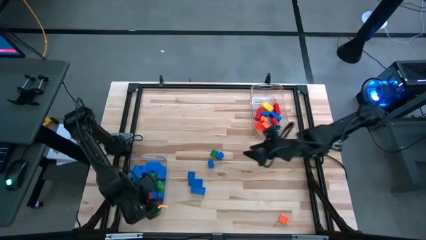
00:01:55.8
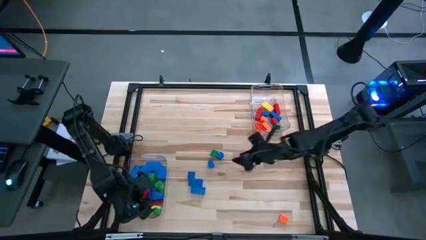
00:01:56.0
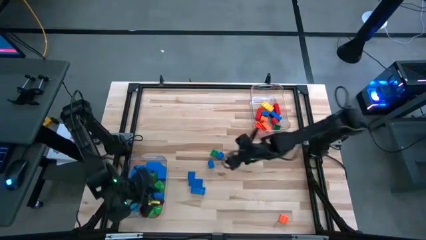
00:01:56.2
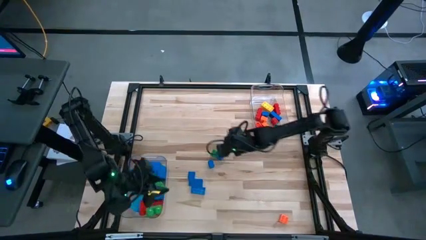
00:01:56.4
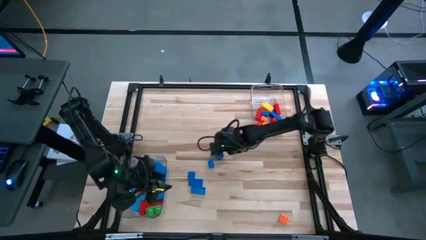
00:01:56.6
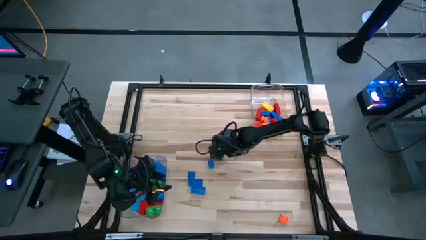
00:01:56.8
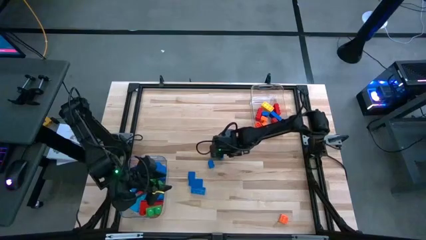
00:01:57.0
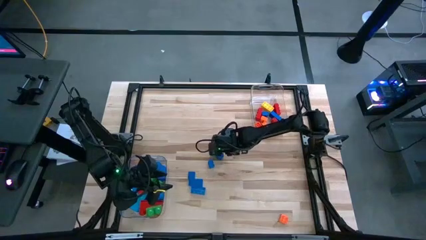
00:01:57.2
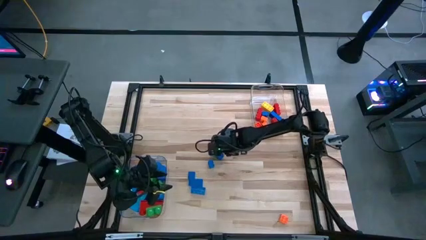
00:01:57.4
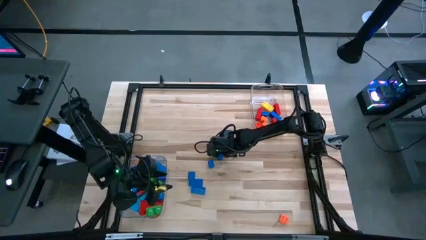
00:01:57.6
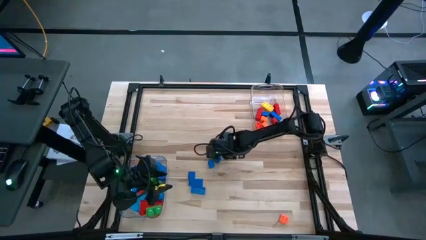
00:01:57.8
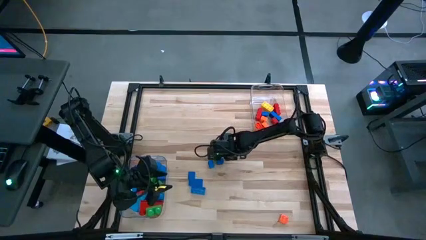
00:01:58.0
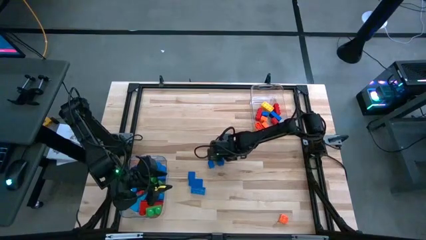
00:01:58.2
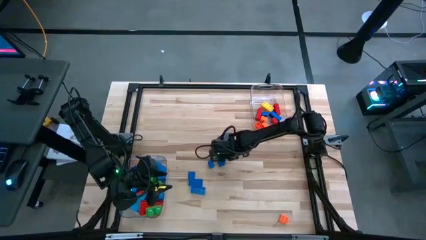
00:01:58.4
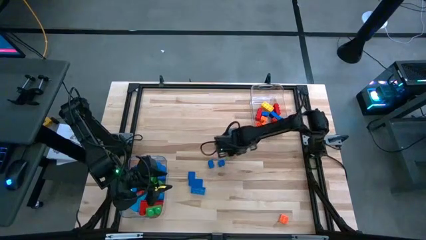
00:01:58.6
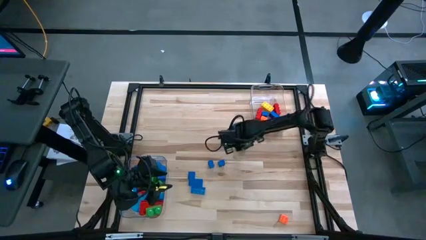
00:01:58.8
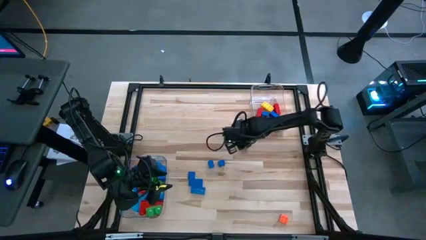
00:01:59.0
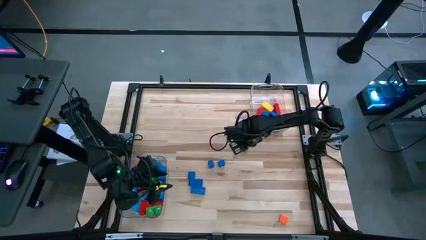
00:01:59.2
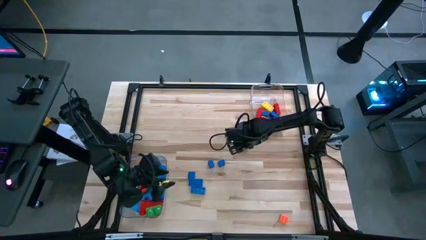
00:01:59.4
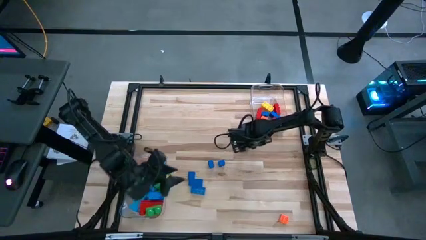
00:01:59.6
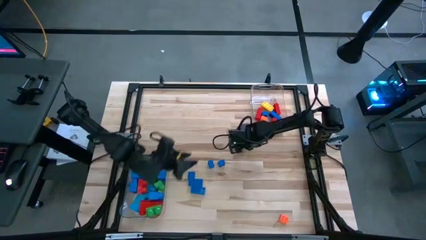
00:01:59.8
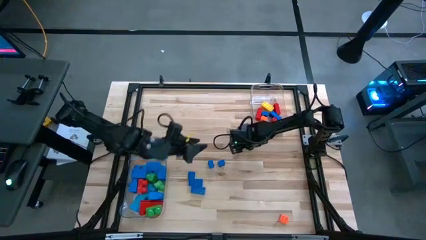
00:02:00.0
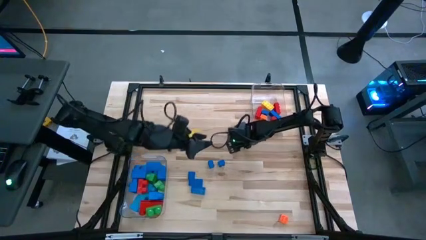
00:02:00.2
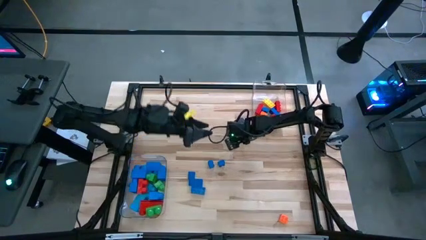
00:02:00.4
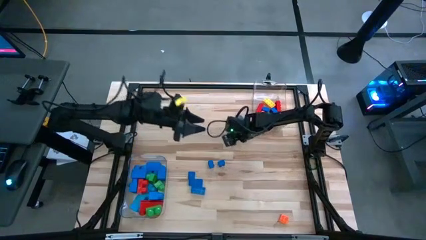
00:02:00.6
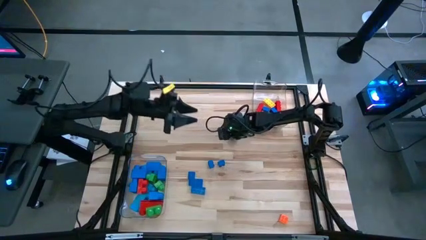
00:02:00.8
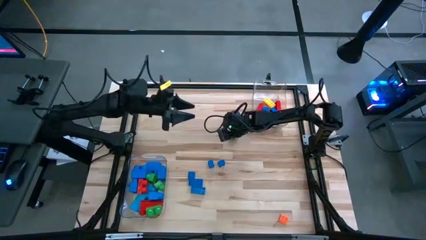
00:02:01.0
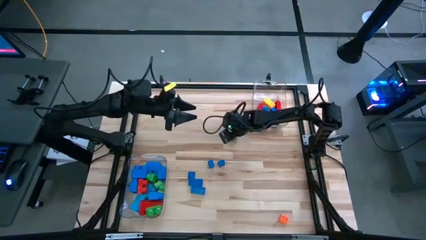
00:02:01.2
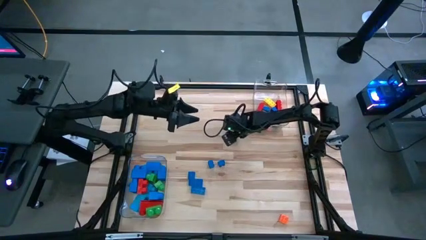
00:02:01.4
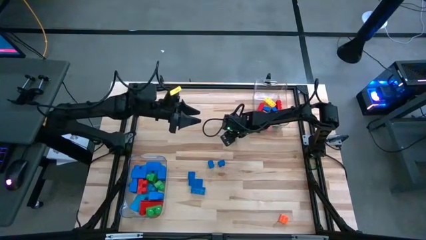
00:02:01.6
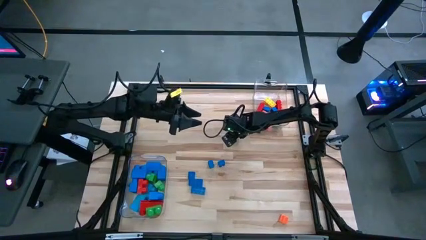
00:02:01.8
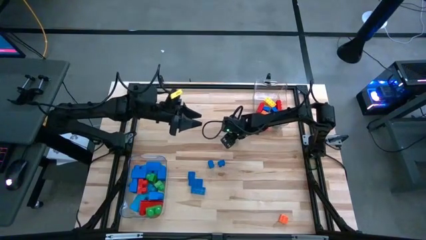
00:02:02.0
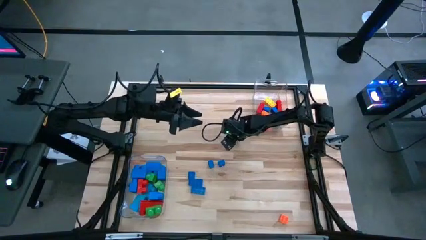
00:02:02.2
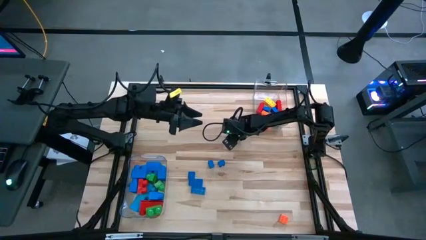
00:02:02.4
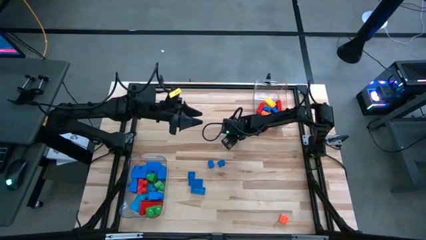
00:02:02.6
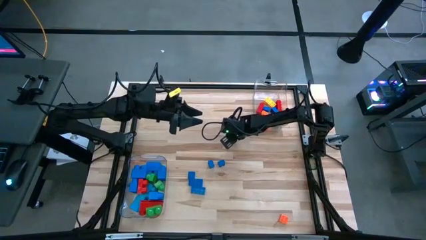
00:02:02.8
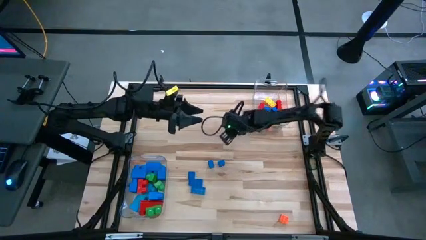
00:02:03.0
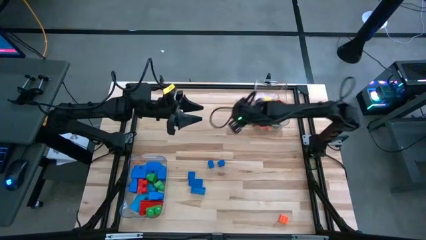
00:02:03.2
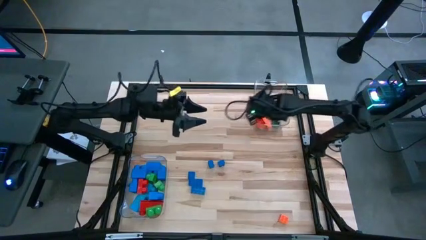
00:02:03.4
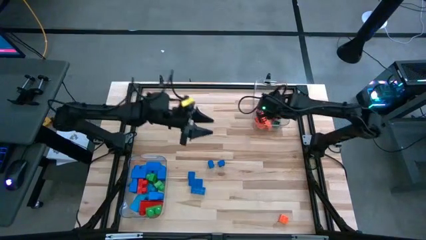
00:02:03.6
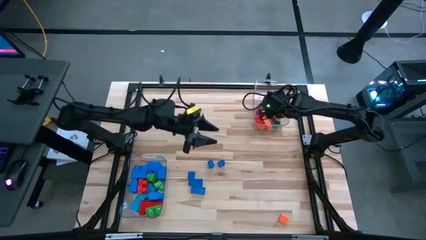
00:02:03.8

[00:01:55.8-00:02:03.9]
Task: Sort blocks by size
Put the small green game piece into the top transparent bin

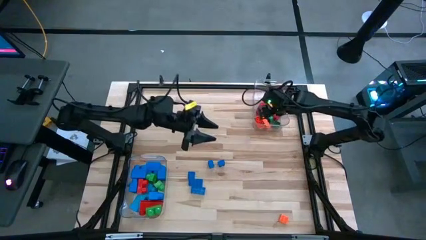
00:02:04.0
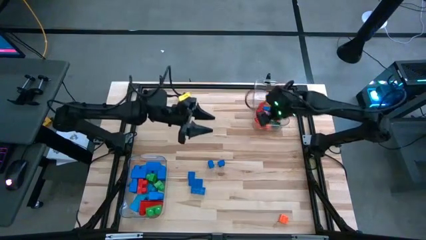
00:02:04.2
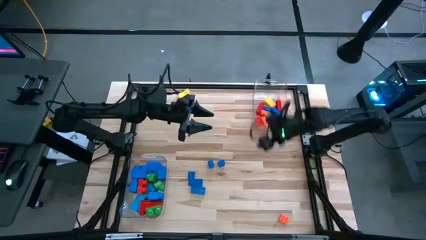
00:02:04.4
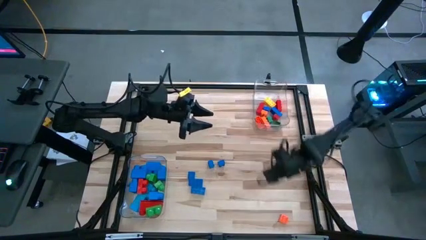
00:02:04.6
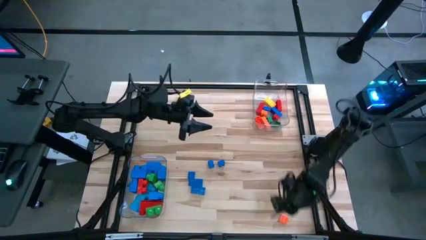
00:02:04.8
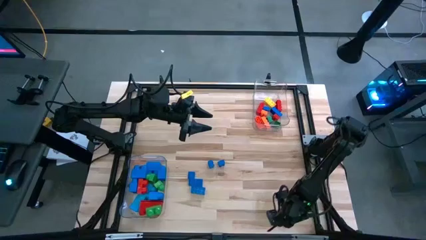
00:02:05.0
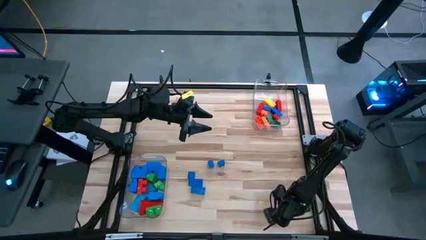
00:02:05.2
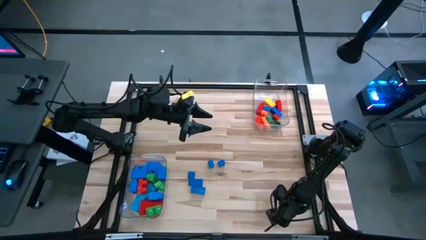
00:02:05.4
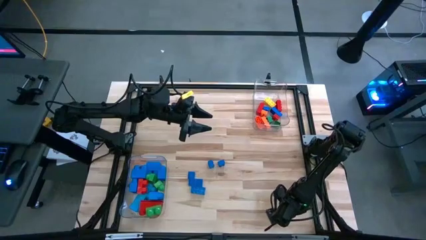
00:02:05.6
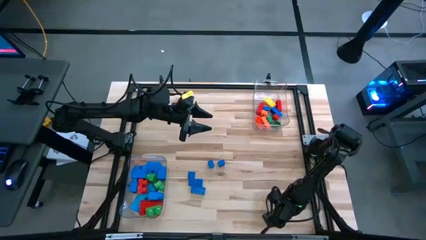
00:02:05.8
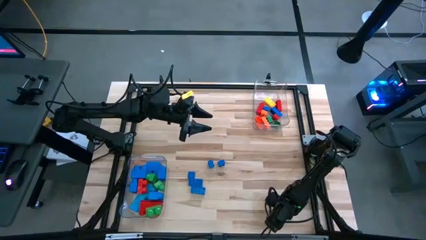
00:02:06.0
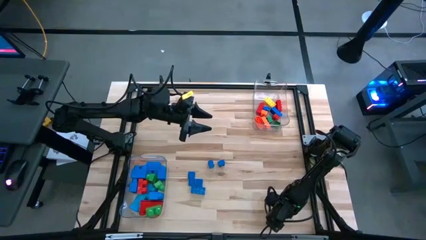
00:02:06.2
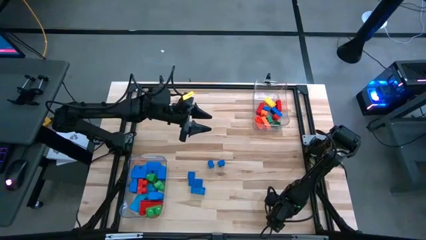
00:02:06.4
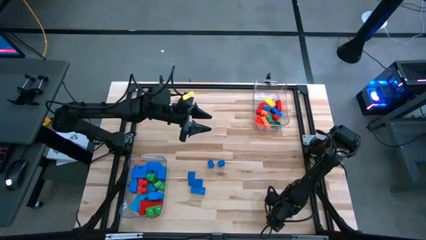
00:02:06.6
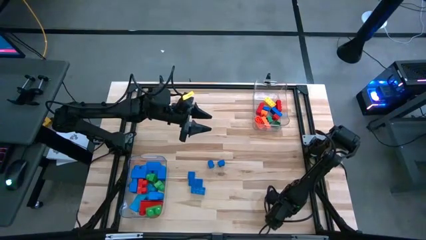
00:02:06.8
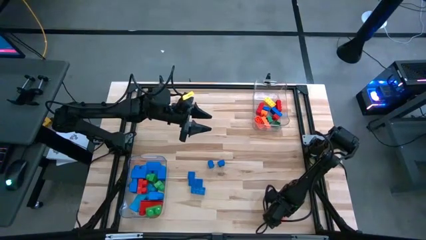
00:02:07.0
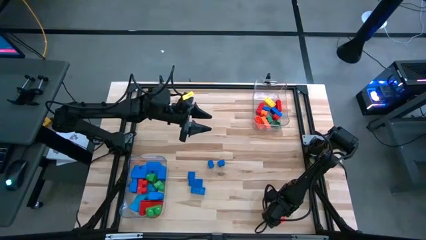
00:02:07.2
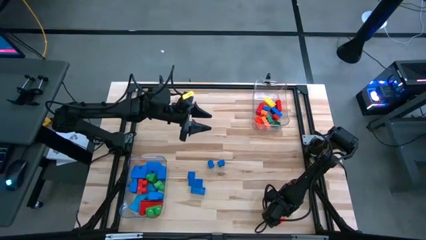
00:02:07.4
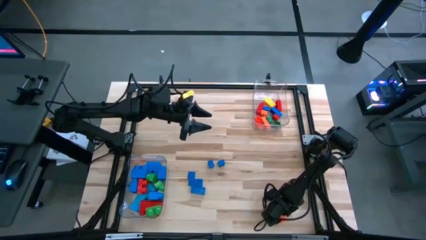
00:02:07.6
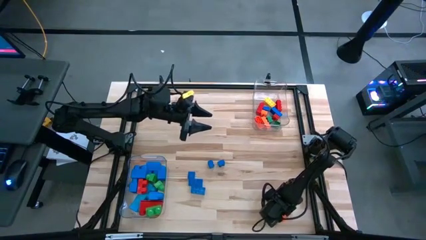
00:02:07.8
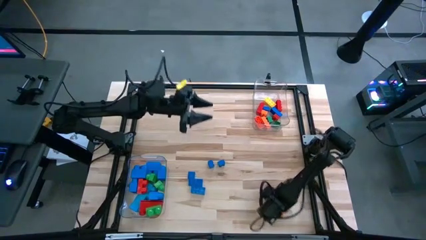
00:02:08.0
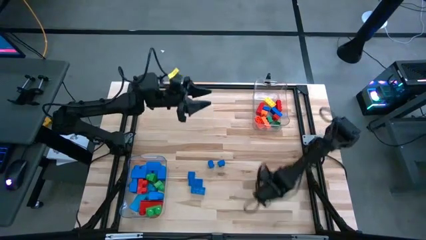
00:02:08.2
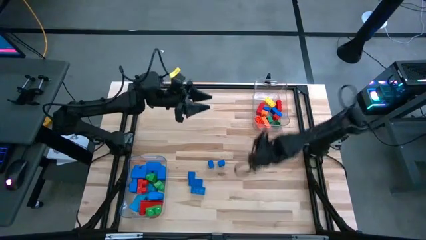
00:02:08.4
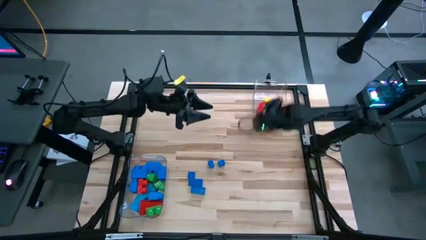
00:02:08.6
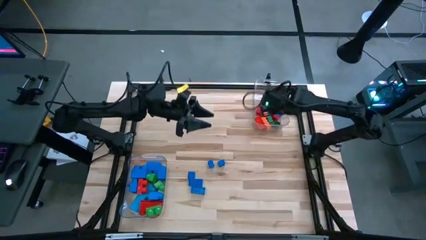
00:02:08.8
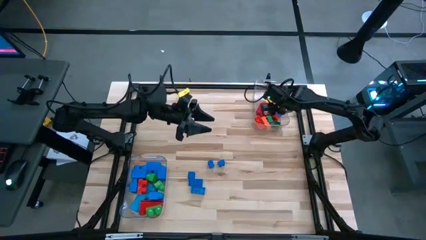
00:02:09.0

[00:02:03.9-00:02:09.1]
Put the small orange game piece into the top transparent bin

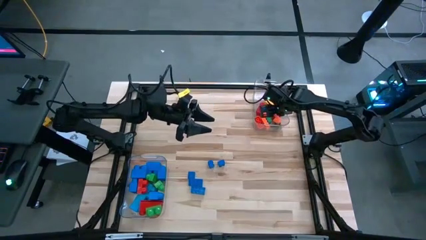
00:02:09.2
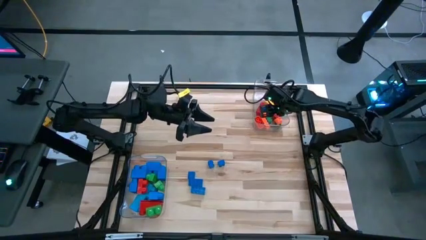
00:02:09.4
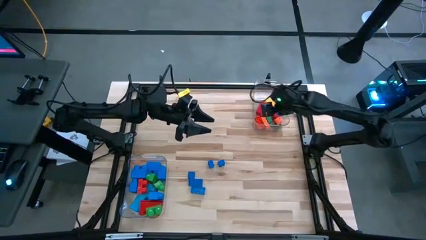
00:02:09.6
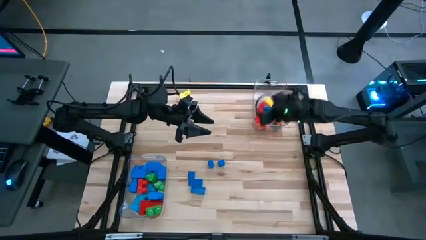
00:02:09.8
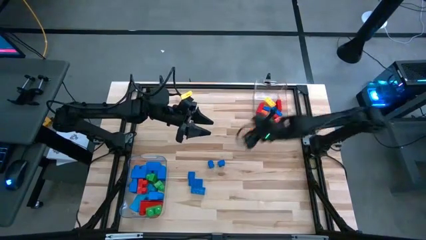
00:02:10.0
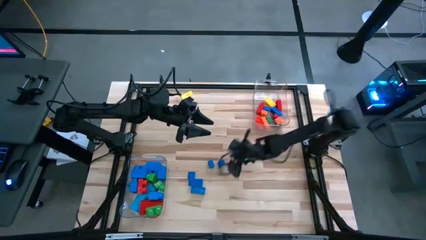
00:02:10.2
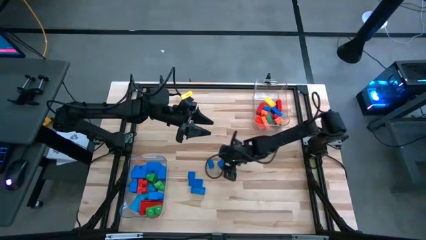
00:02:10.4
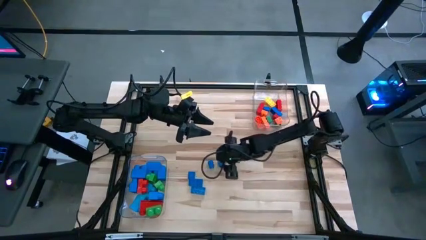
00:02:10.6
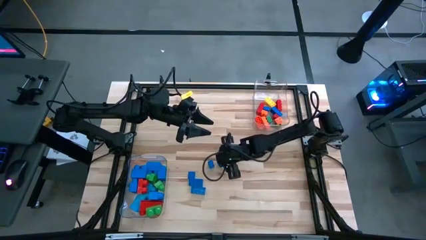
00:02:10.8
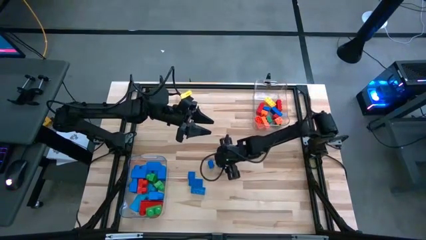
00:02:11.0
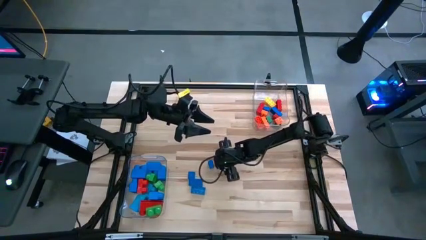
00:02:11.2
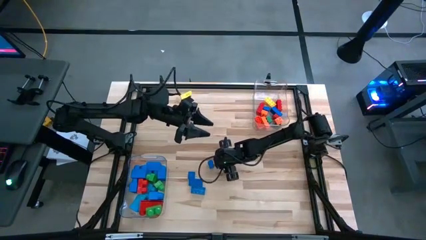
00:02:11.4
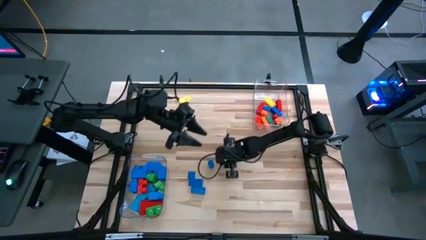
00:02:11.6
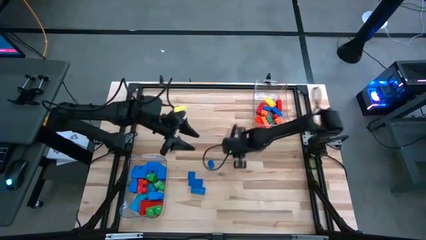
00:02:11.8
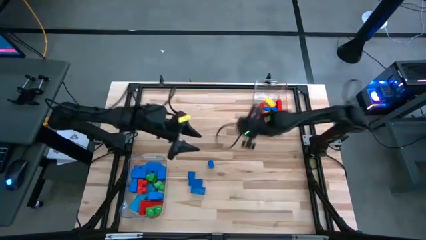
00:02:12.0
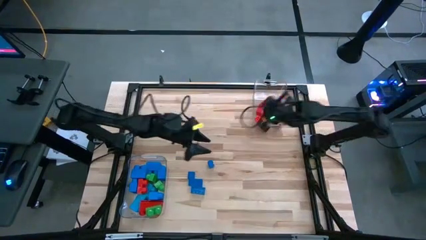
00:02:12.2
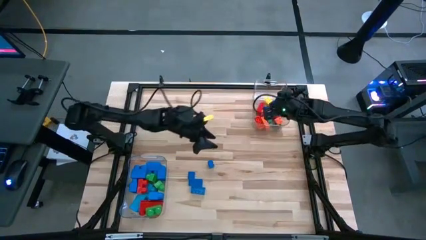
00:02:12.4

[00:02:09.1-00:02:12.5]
Put the small blue game piece into the top transparent bin
